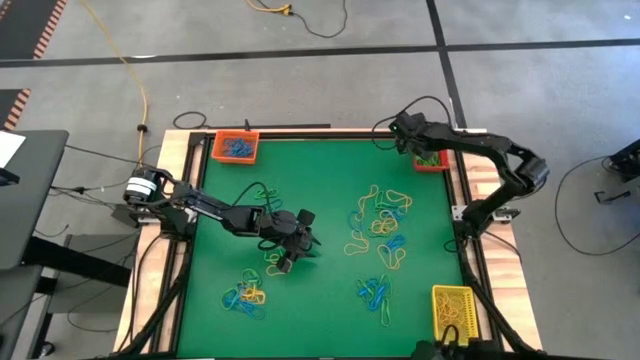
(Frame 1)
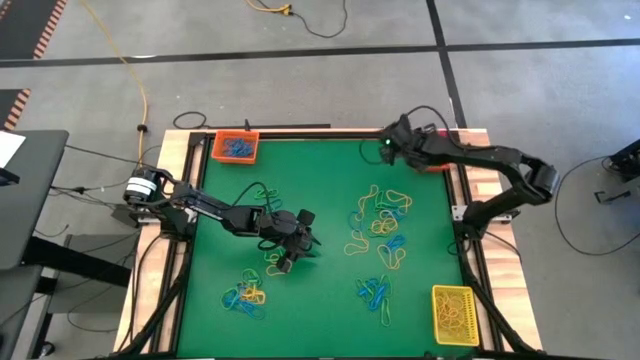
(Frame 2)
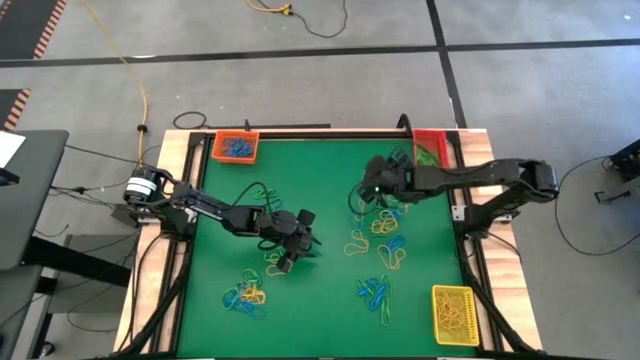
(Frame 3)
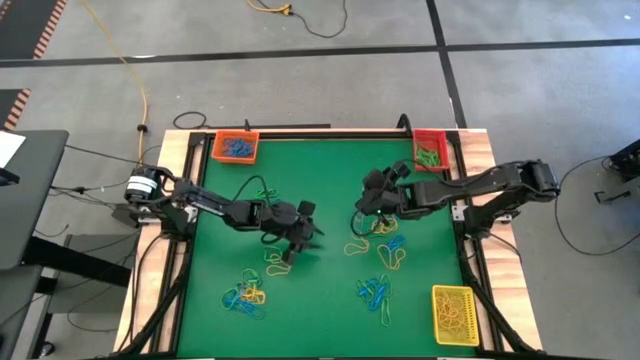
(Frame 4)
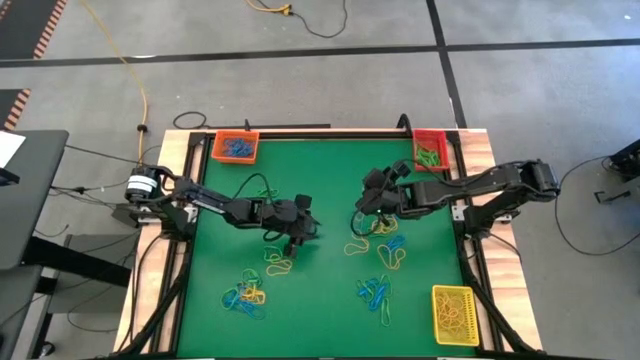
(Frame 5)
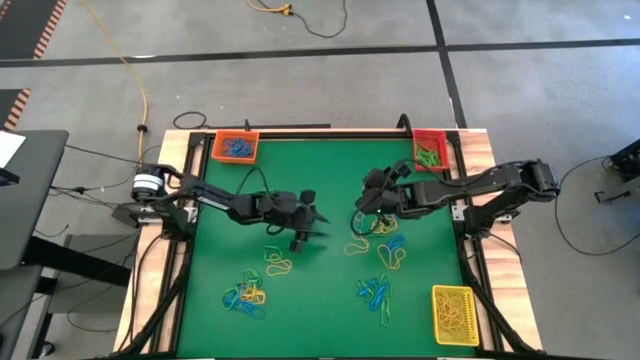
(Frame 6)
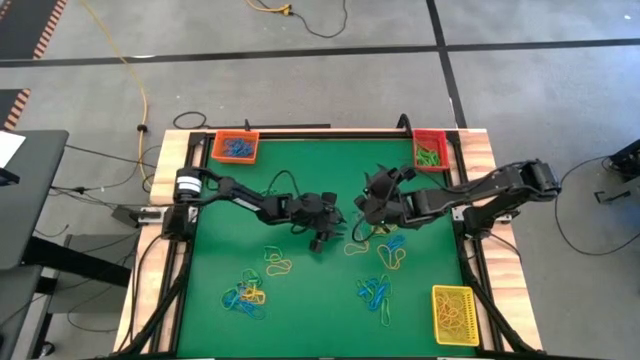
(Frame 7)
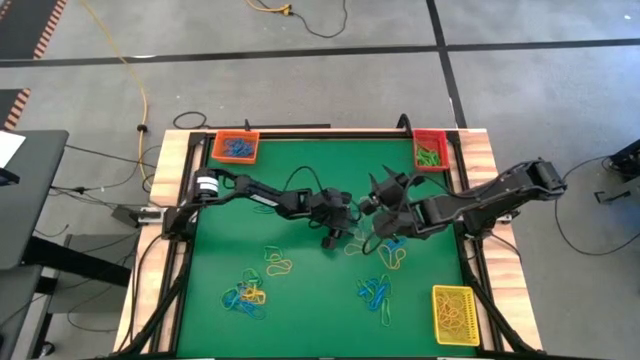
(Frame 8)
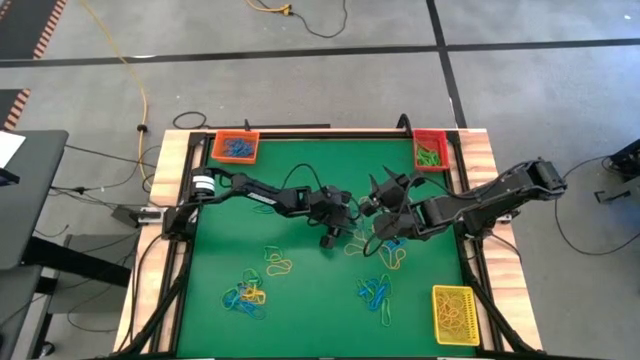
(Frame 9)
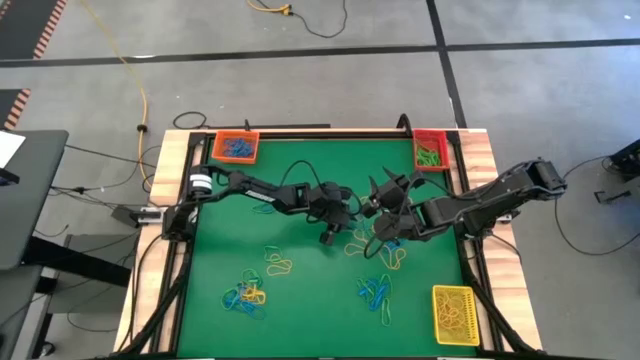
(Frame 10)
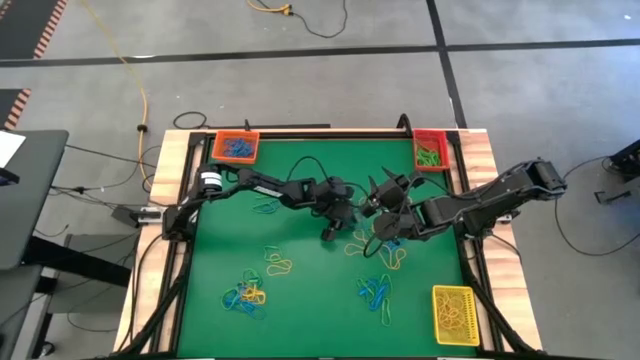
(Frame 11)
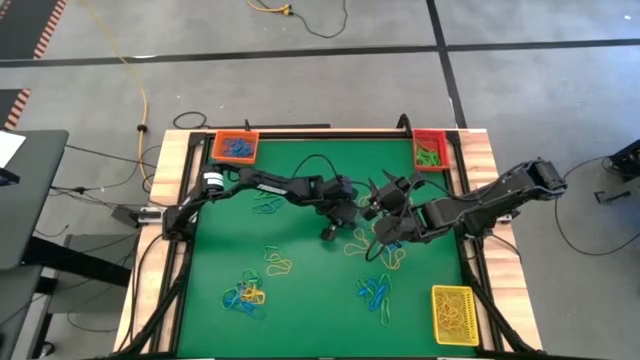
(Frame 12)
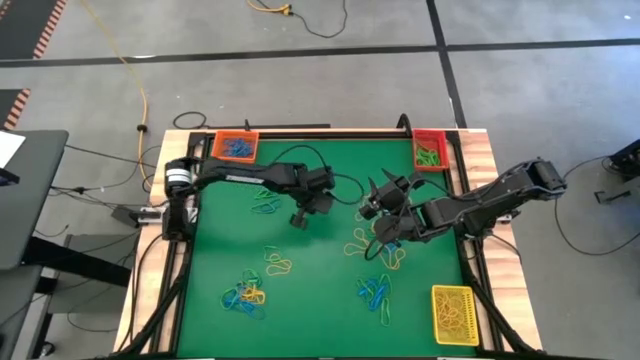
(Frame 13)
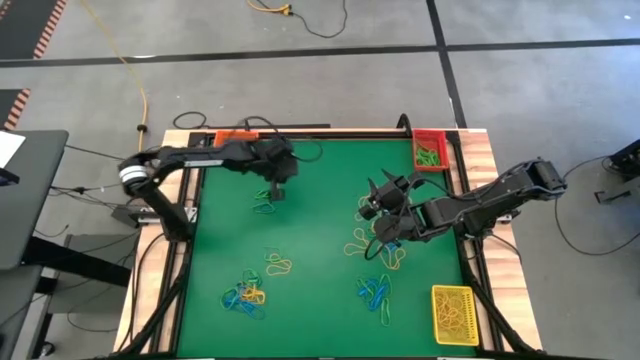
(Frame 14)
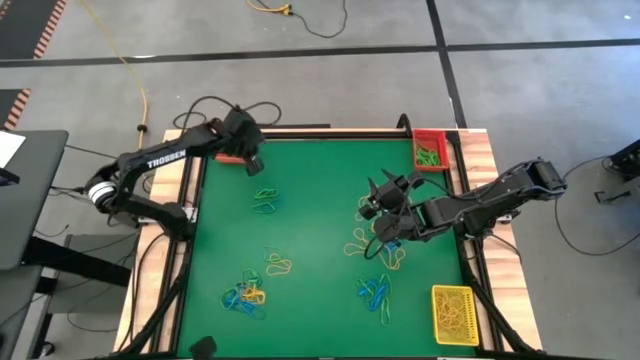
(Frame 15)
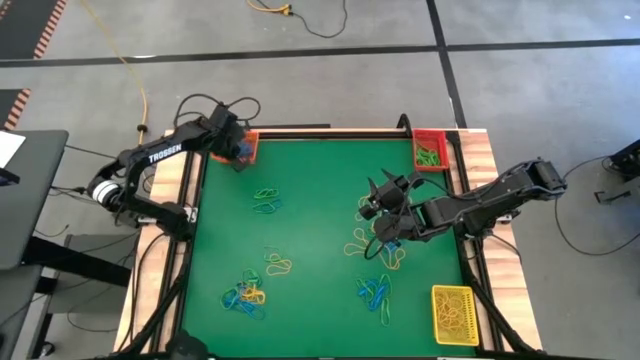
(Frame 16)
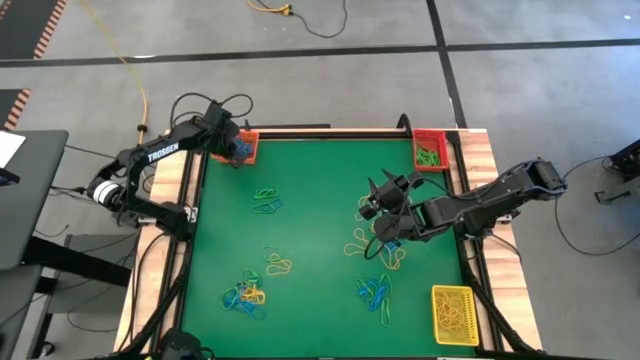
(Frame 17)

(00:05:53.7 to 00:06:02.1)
Task: Sort rubber bands into baskets
Put the top right blue rubber band into the orange bin

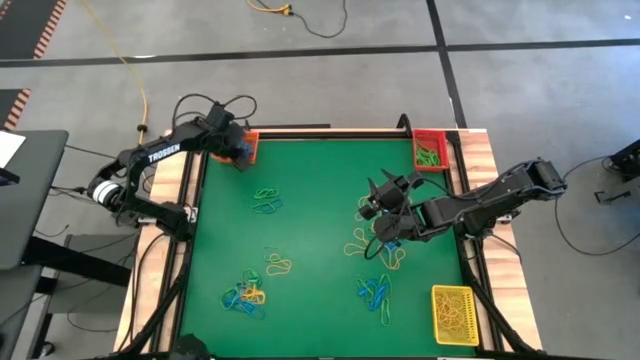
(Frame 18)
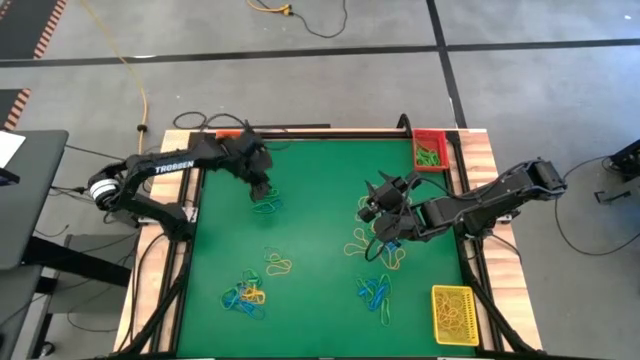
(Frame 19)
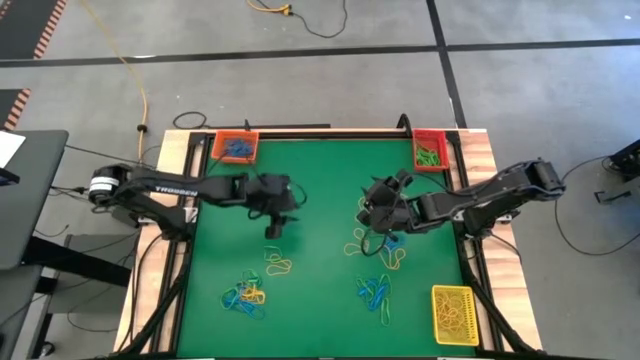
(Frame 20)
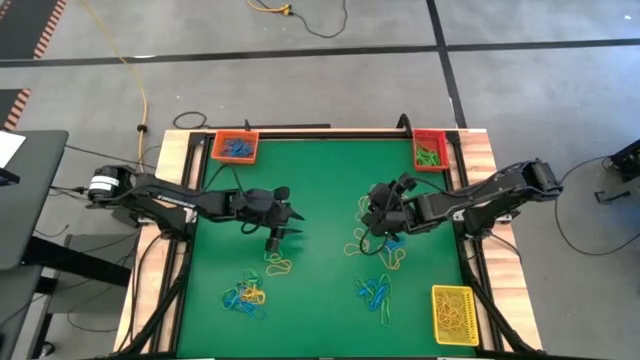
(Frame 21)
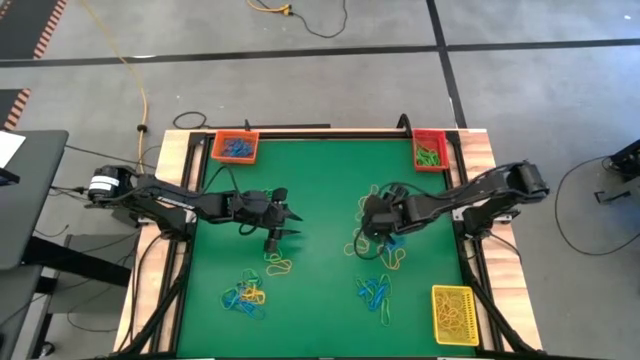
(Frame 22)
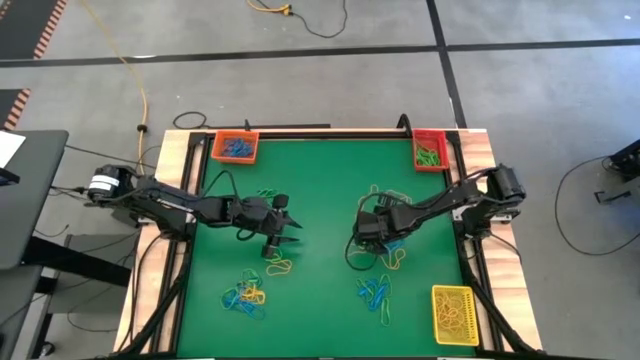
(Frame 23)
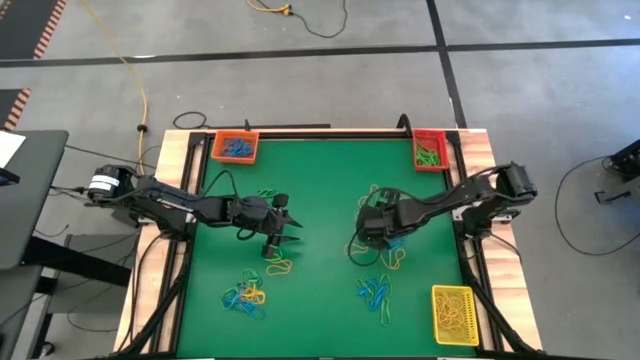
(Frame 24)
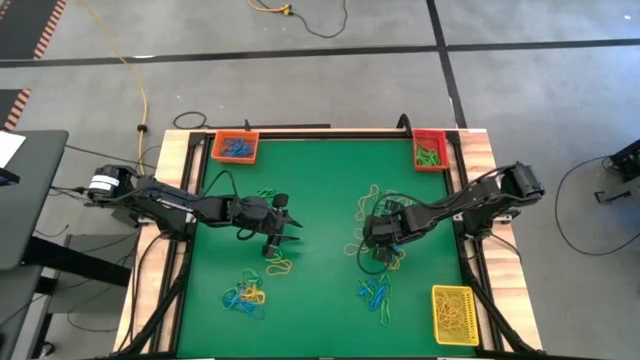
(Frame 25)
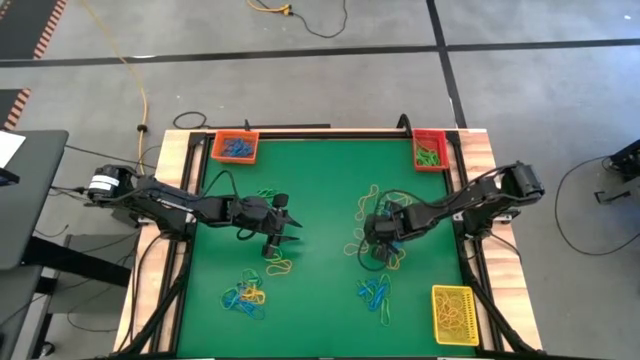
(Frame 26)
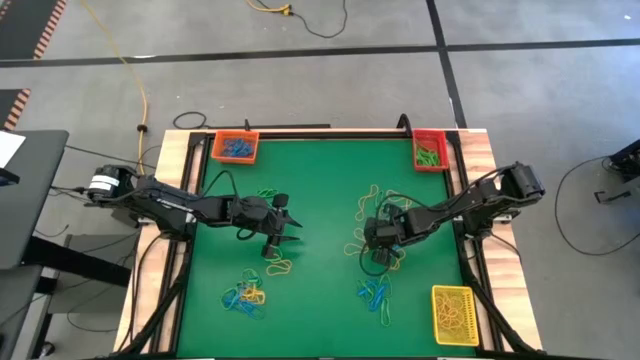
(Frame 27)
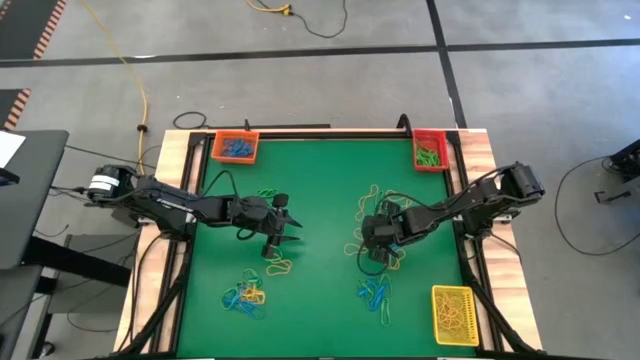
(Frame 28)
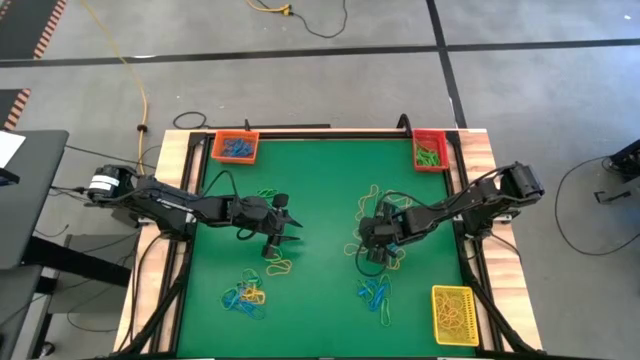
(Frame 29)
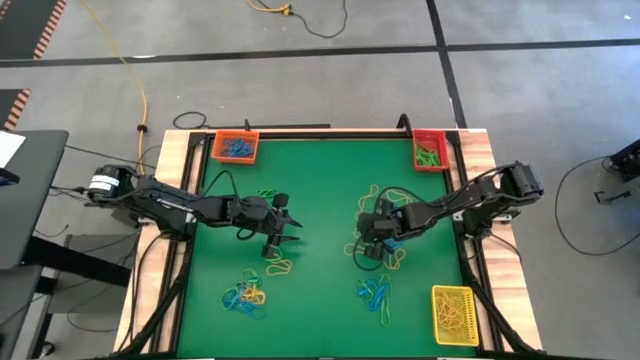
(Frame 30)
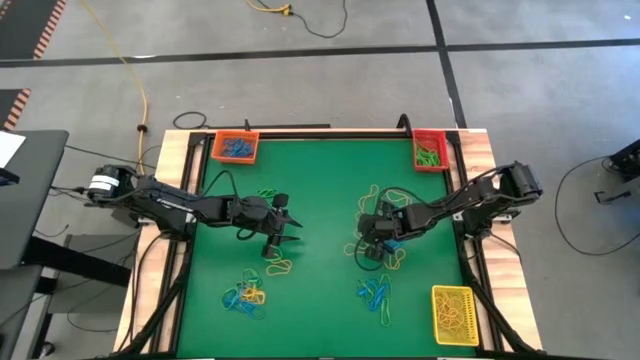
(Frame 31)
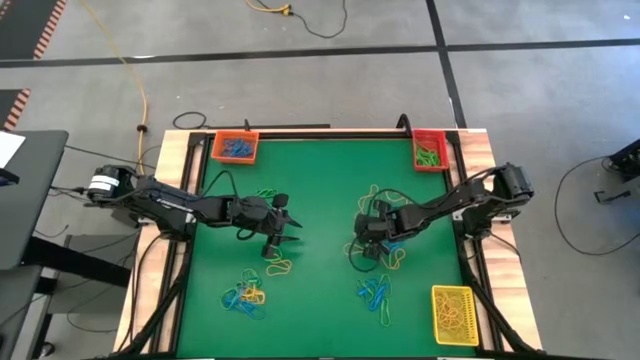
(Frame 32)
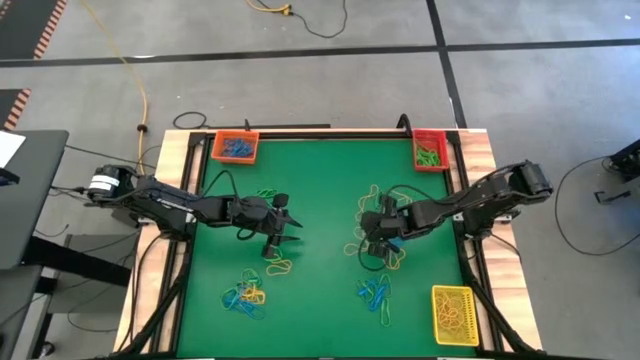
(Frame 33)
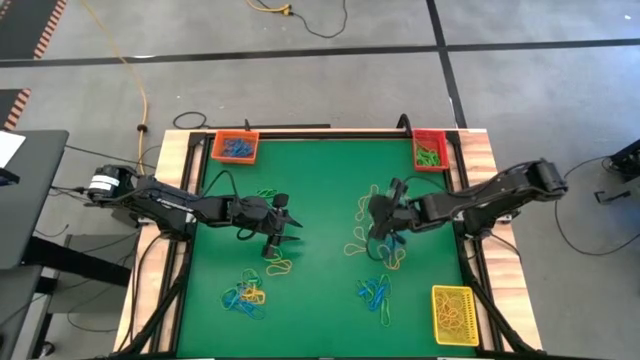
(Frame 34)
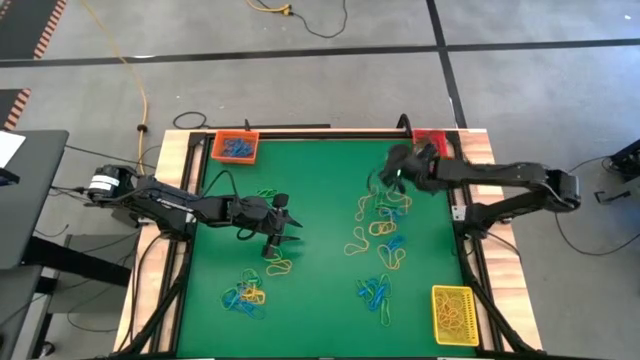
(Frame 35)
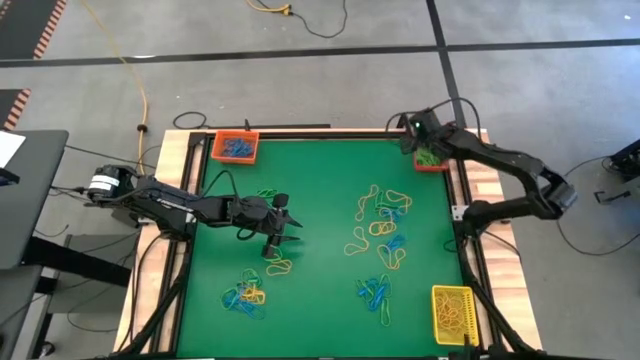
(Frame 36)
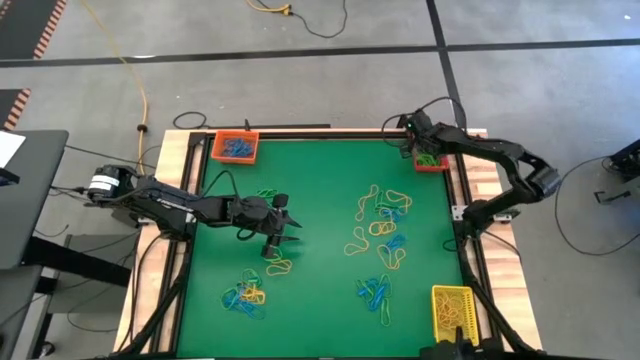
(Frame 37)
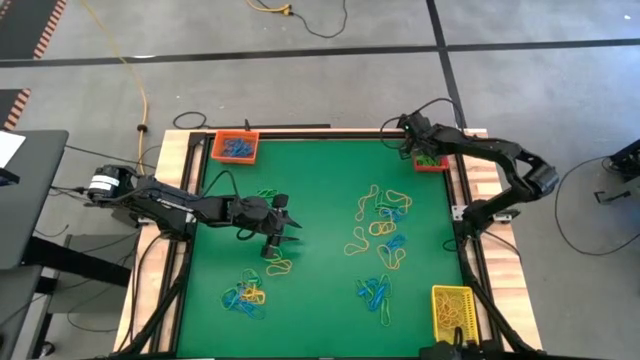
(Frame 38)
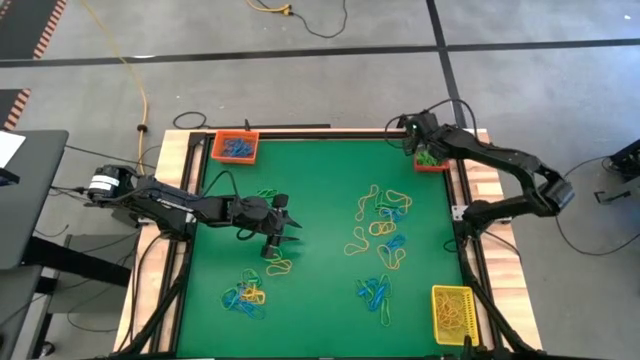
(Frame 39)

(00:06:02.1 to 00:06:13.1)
Put the top right green rubber band into the red bin

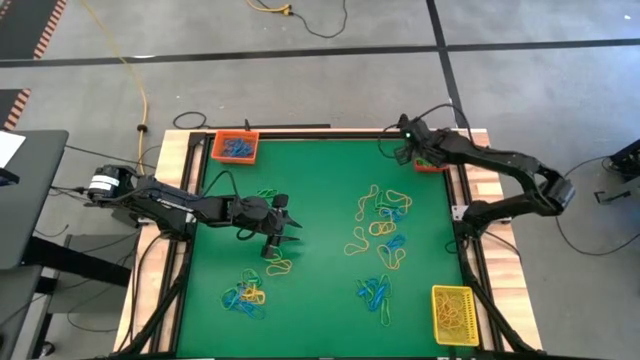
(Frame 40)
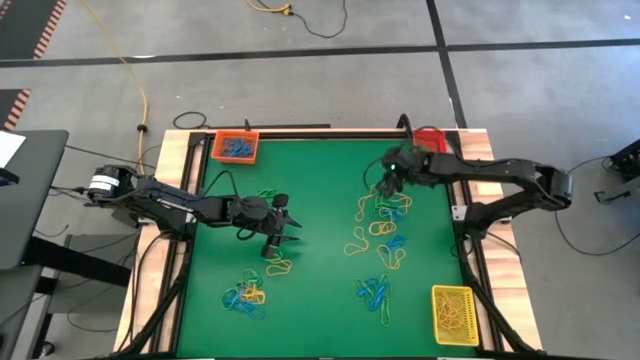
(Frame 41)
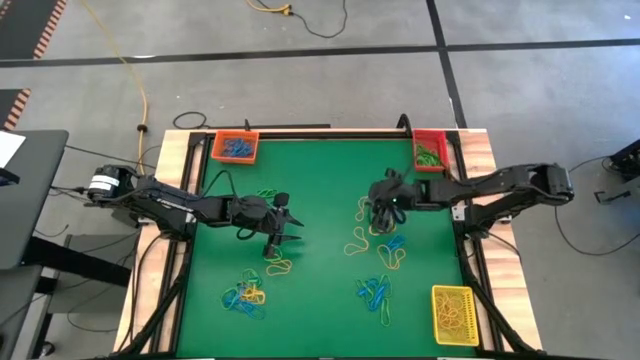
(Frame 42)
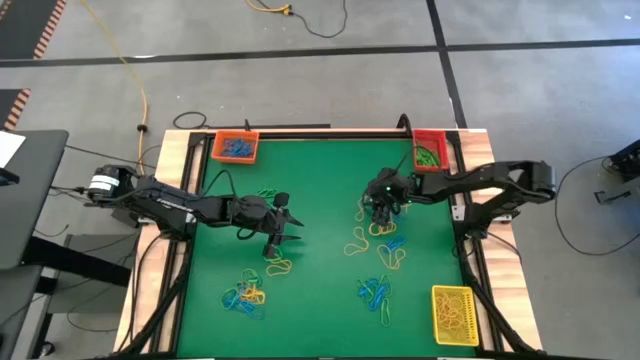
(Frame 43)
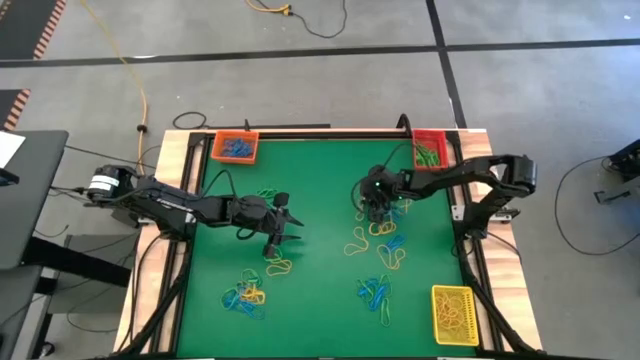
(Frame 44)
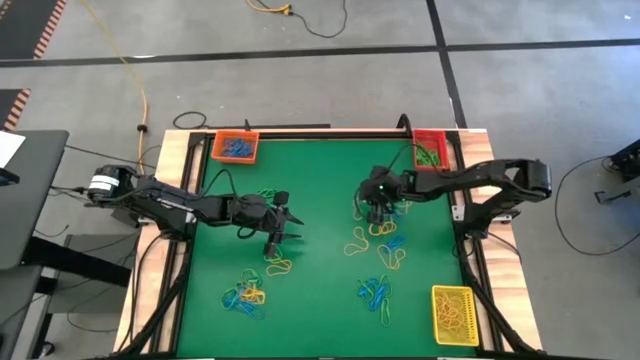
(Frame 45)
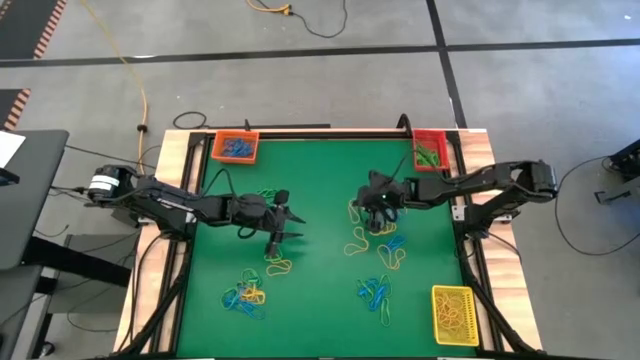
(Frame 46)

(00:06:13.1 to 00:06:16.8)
Put the top right yellow rubber band into the yellow bin
